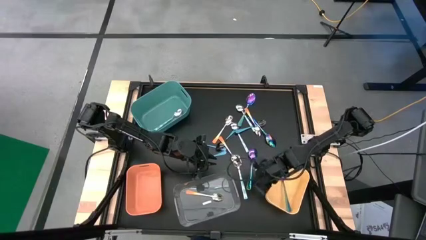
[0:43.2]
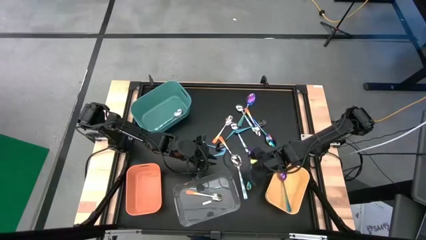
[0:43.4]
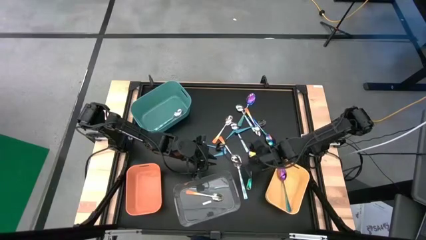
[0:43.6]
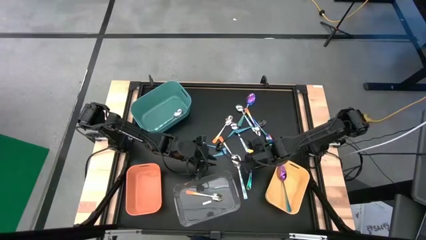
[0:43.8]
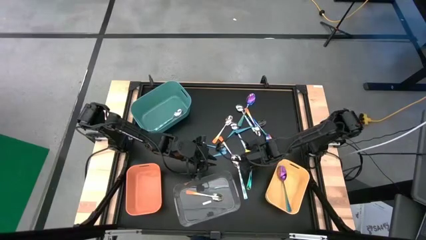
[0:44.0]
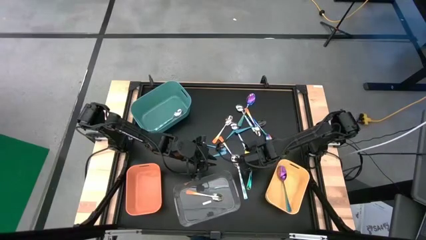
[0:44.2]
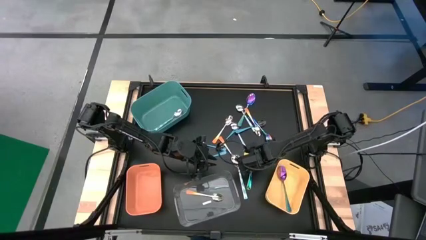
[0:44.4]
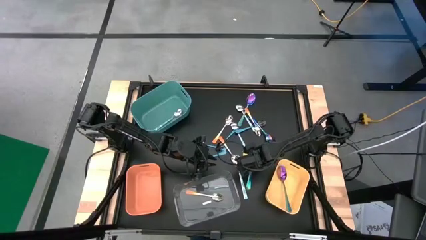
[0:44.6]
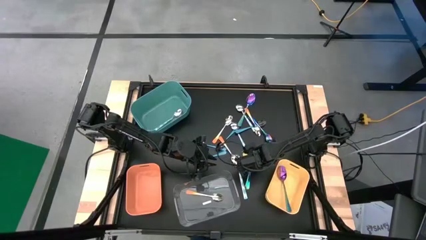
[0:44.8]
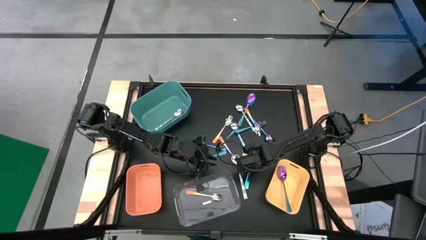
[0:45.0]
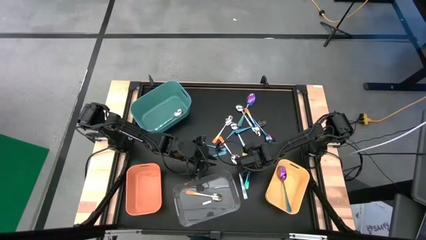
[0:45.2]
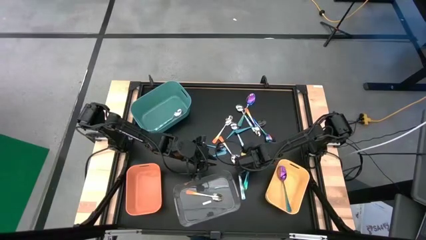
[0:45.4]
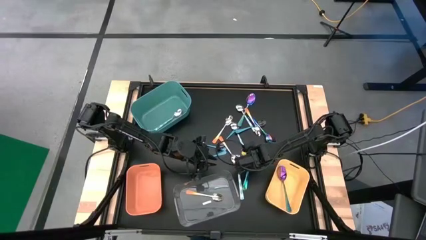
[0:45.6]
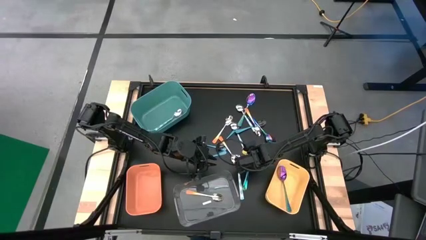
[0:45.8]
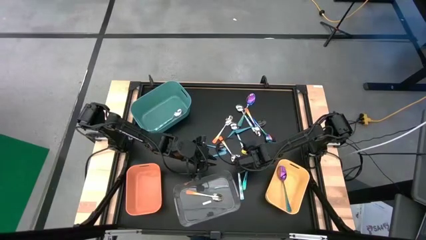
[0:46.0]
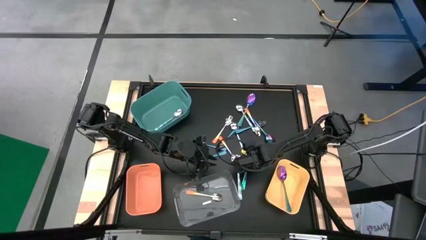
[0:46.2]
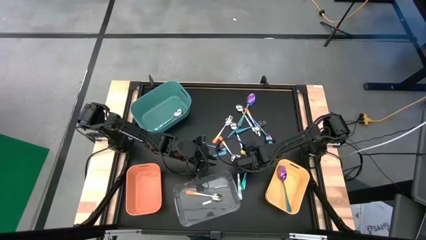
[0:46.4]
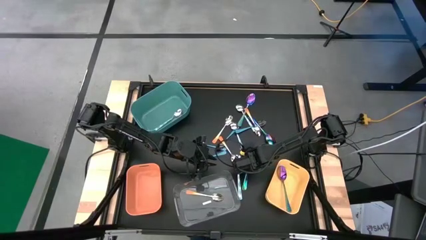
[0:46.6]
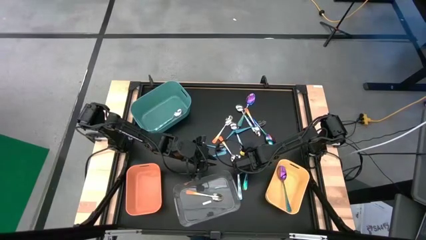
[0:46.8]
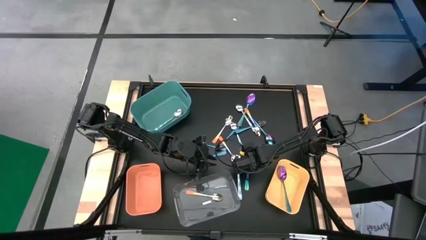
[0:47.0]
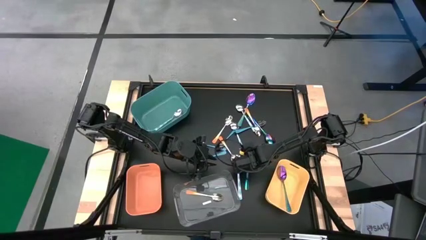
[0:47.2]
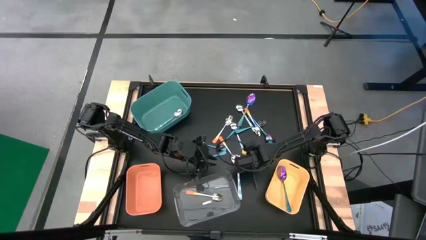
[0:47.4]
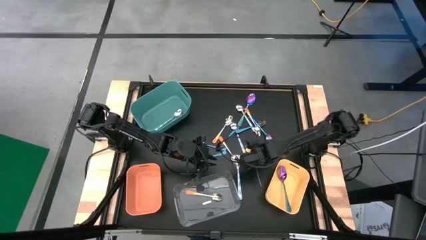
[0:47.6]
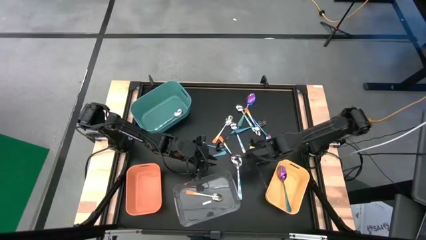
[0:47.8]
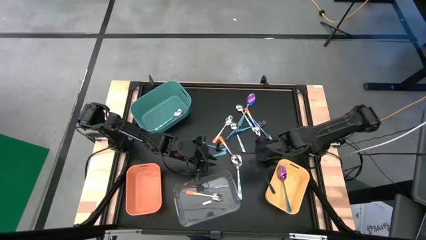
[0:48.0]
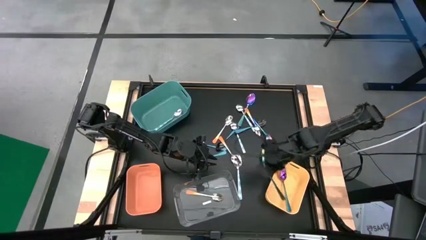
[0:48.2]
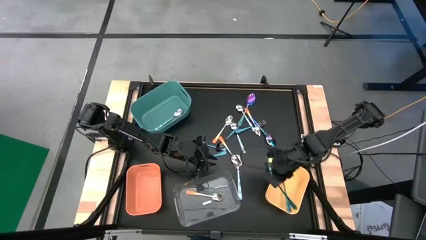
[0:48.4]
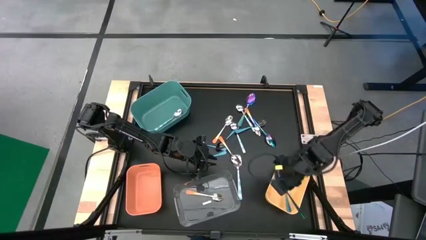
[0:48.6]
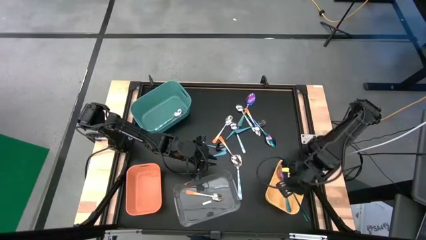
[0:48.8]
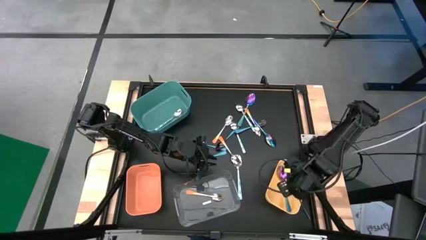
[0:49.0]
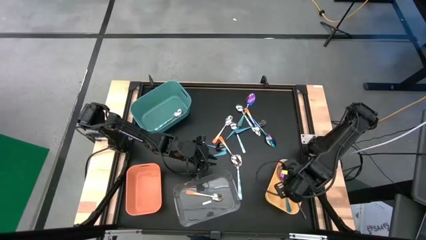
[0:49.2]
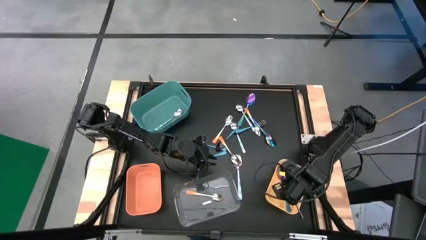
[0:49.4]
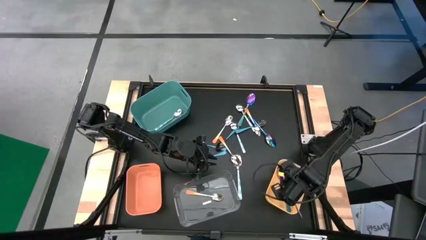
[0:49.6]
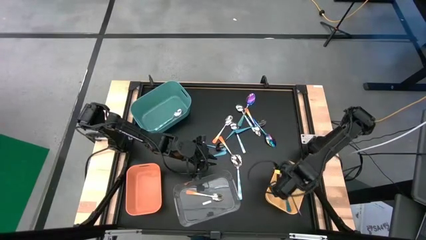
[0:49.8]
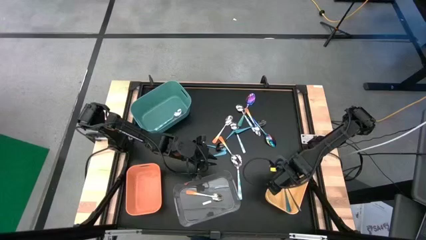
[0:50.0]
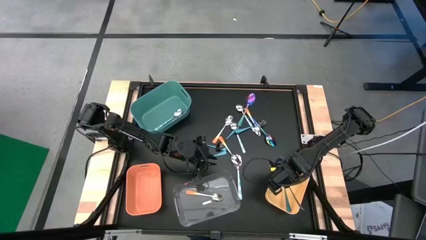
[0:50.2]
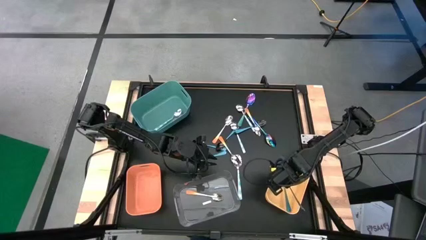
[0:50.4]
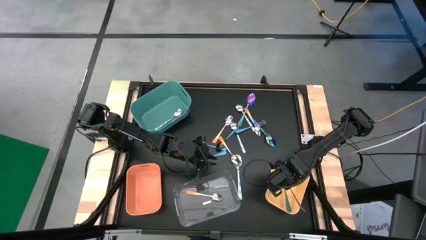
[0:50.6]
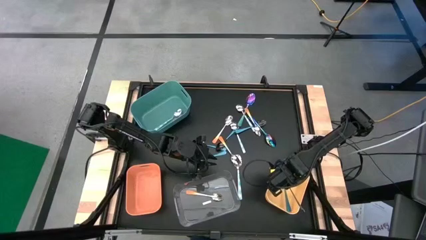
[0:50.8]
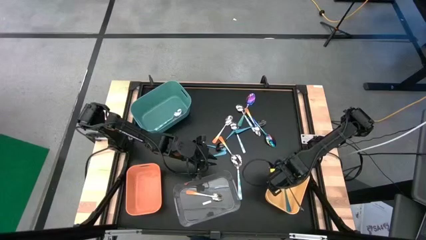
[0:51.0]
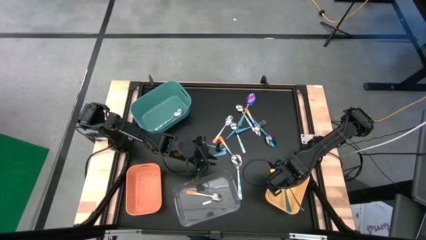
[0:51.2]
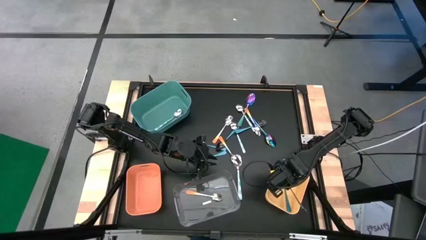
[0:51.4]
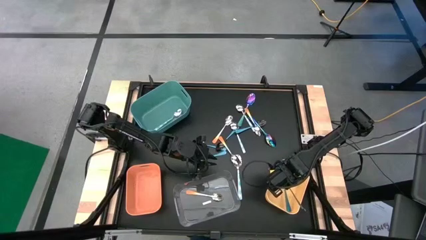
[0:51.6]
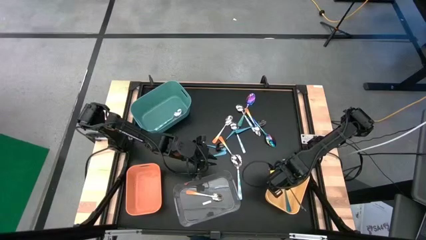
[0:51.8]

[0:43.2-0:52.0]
Task: Sort silverware by color (type)
Put the purple spoon into the yellow bin

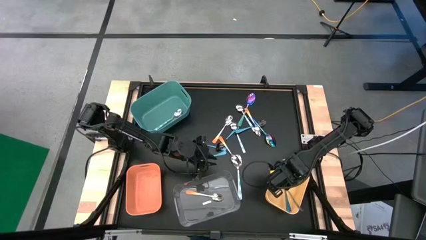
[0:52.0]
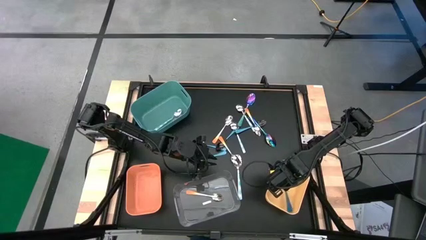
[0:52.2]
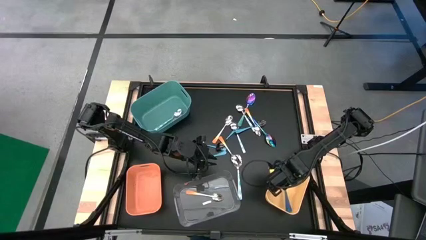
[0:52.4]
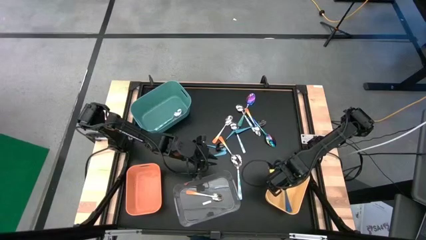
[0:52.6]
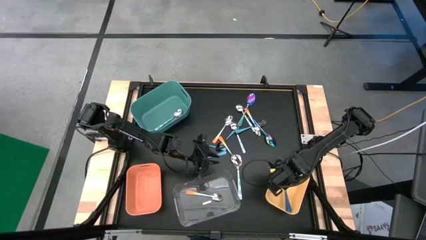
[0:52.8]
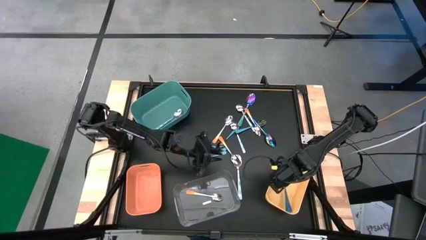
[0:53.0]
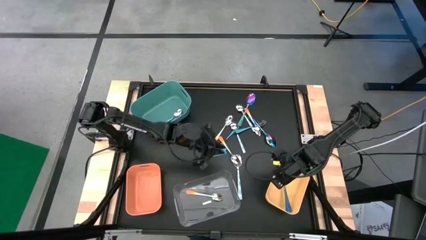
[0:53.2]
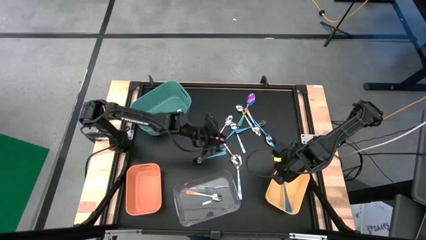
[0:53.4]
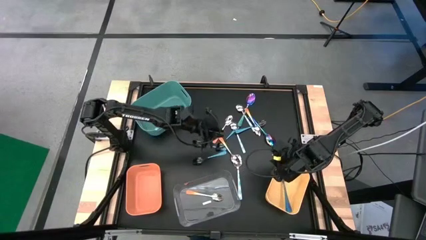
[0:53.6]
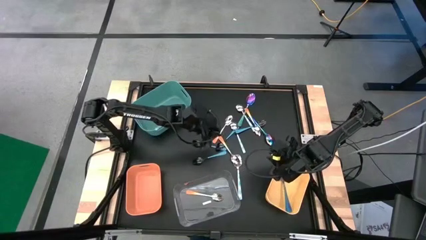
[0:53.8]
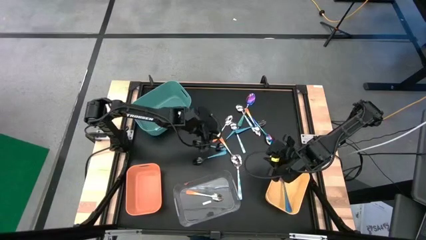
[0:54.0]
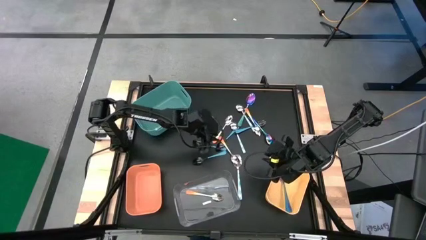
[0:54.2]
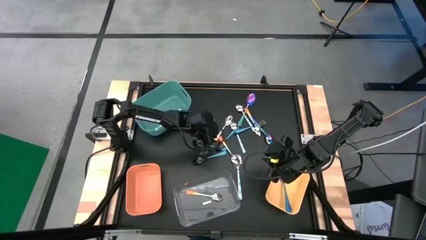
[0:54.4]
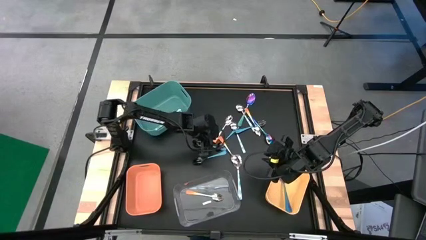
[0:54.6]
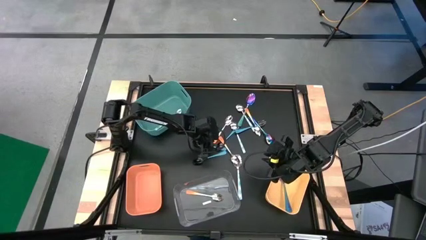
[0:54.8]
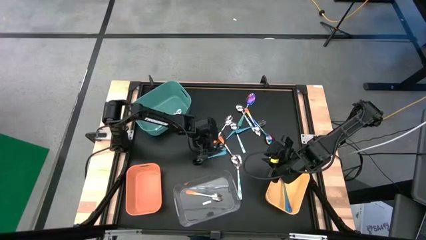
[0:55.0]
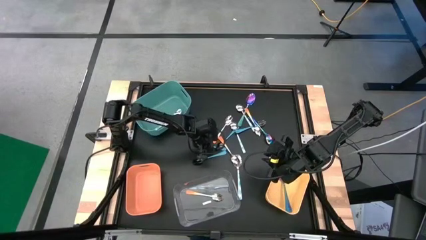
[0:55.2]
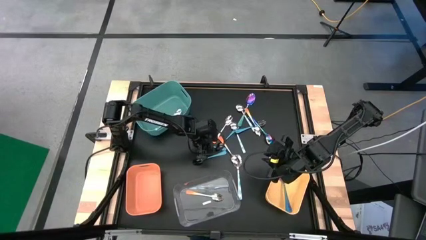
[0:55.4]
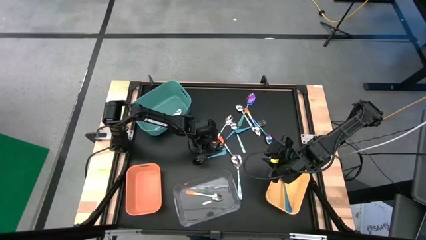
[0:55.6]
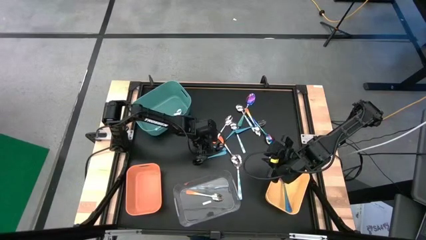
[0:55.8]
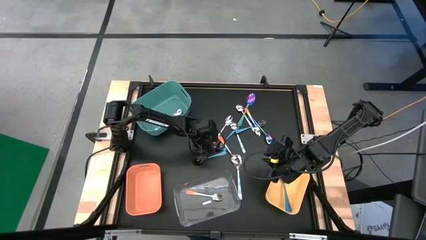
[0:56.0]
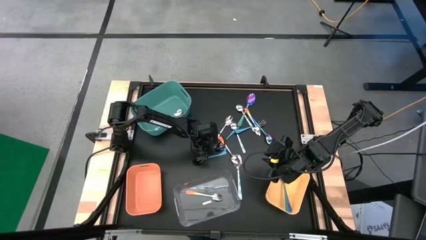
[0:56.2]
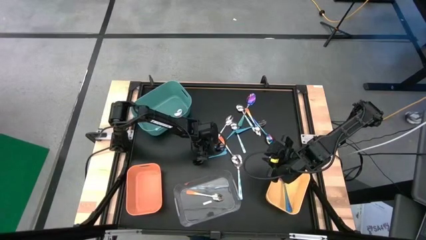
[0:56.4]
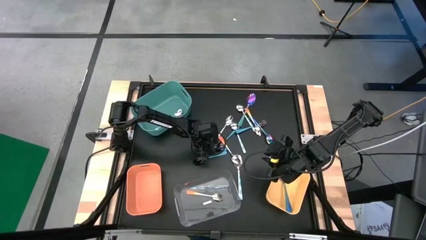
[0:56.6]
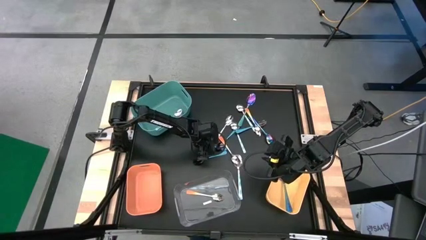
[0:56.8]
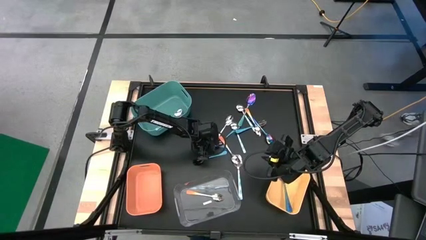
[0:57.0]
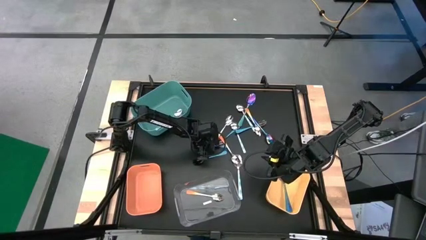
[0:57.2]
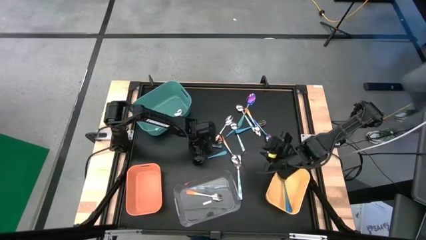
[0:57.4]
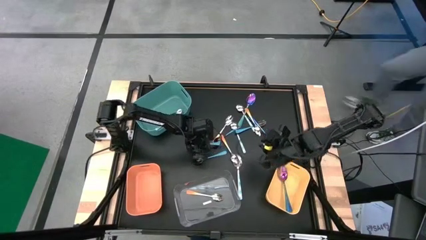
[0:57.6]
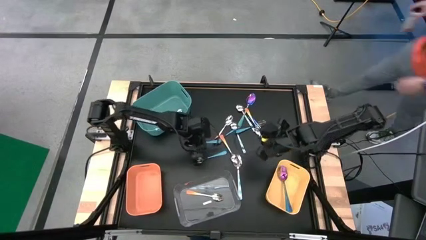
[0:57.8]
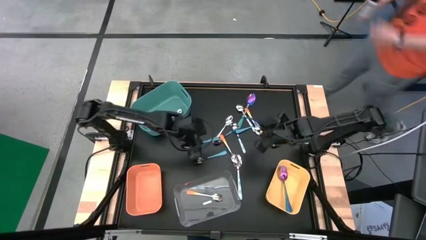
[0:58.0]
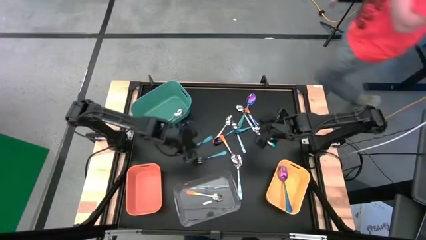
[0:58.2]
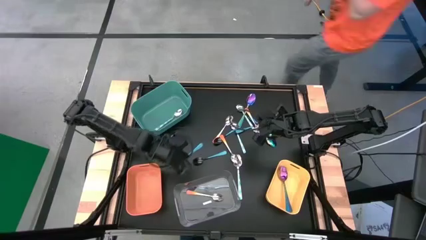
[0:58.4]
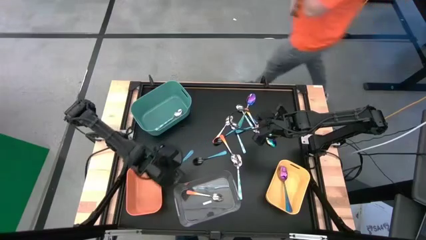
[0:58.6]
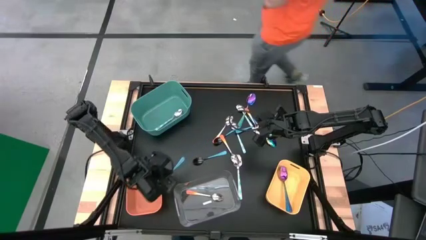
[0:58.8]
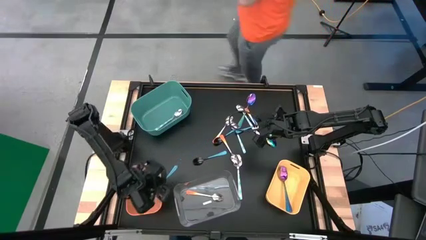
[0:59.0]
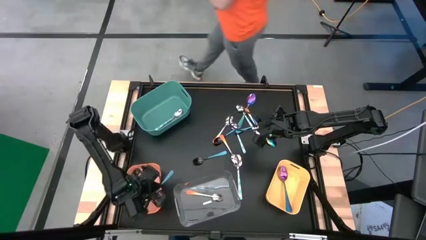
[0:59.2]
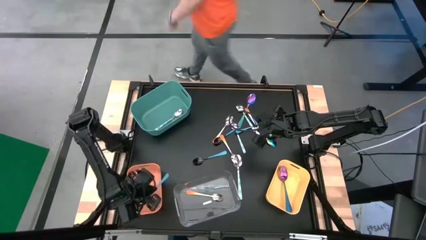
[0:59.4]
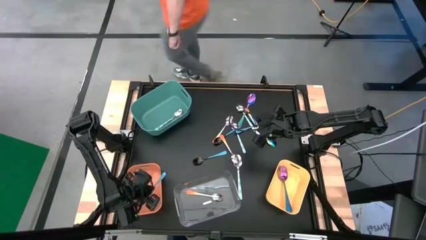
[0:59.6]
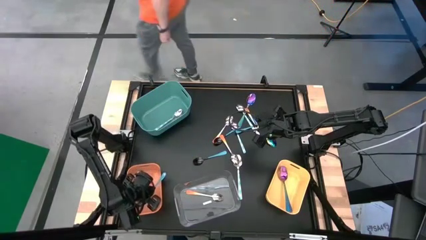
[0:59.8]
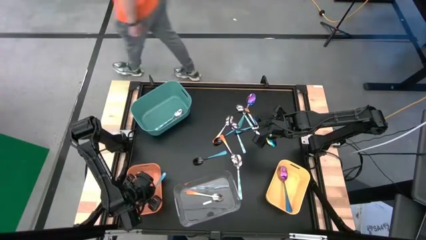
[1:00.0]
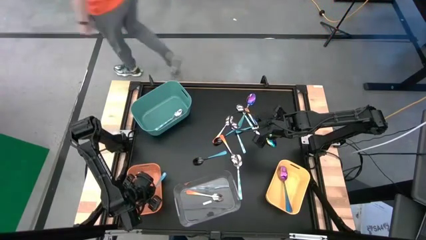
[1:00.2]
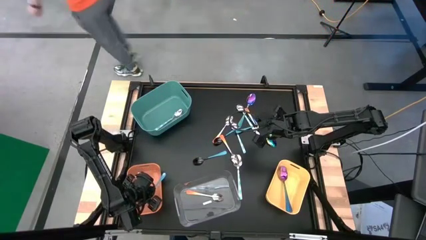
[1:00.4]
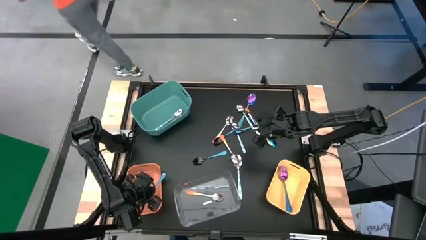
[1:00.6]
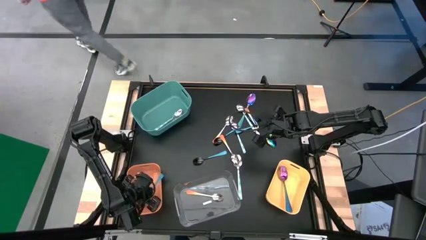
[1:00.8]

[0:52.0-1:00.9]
Put the blue spoon into the orange bin
